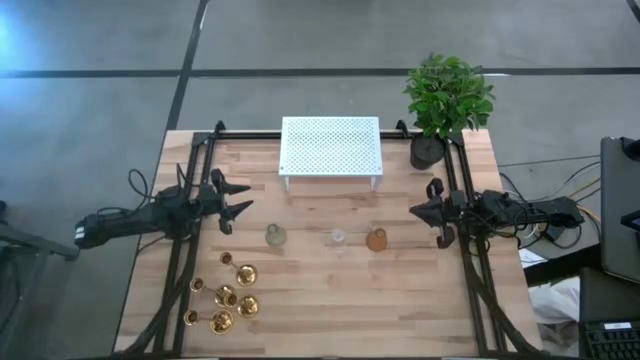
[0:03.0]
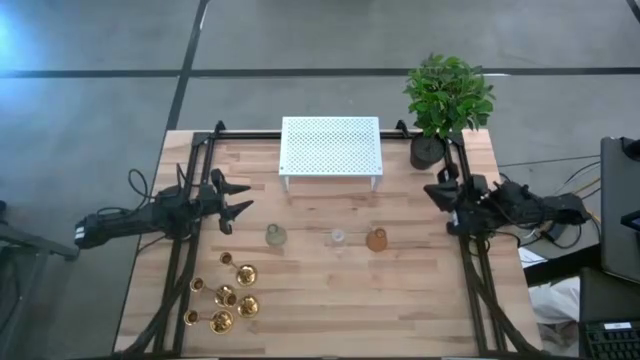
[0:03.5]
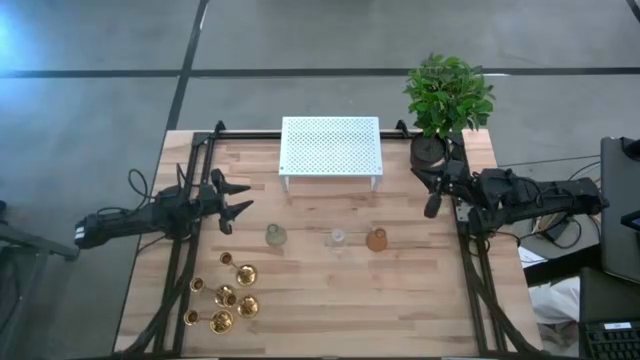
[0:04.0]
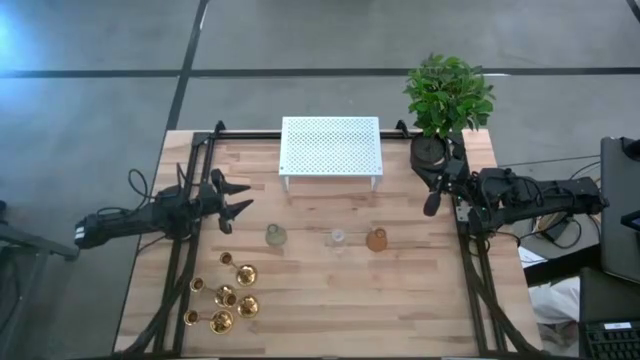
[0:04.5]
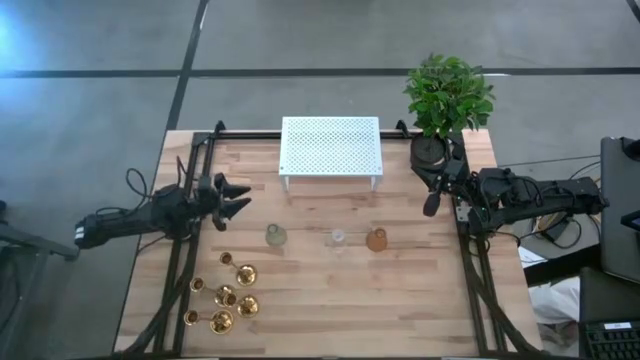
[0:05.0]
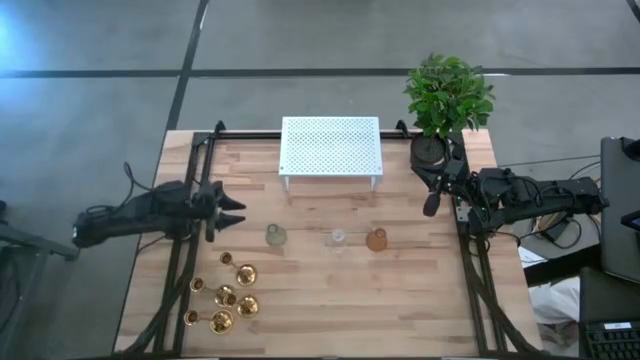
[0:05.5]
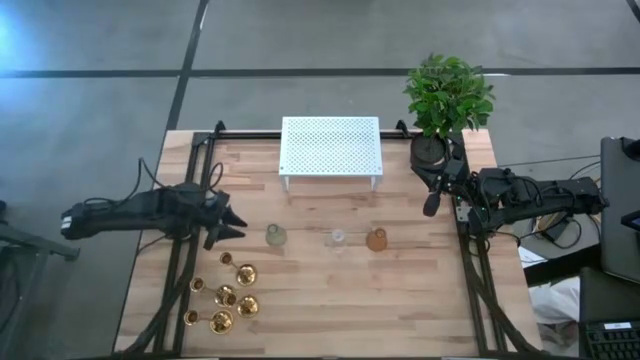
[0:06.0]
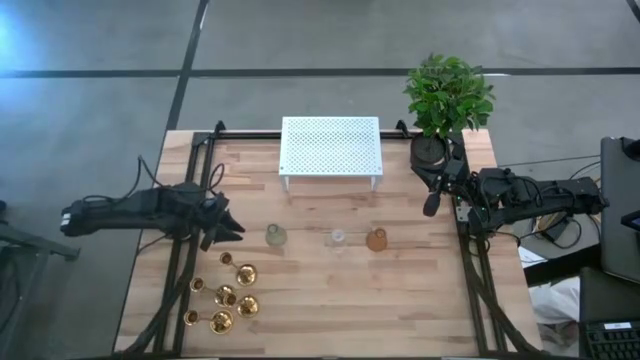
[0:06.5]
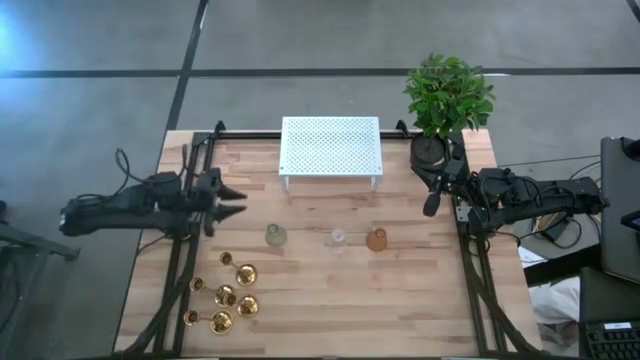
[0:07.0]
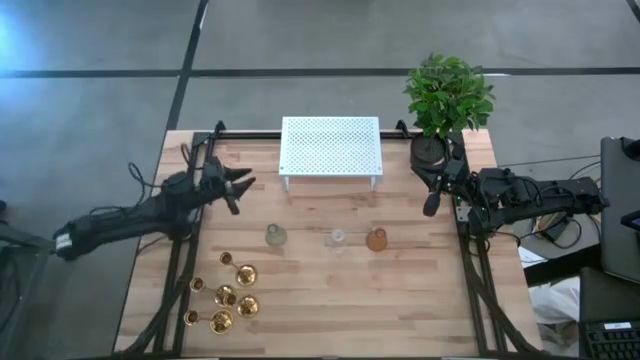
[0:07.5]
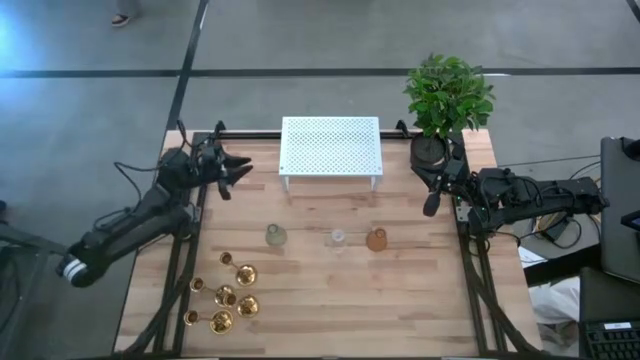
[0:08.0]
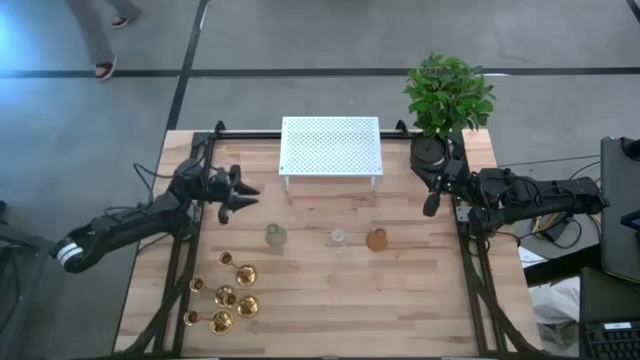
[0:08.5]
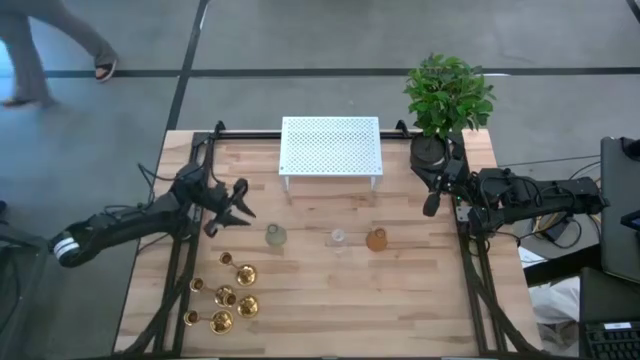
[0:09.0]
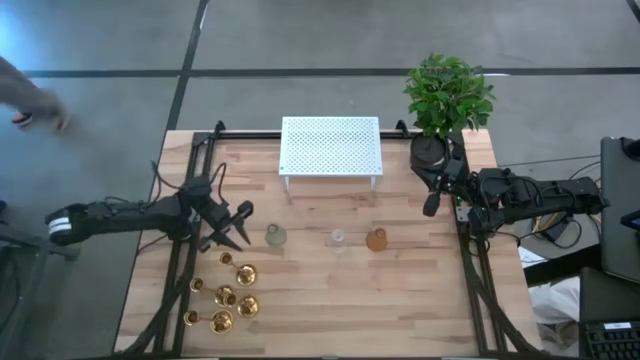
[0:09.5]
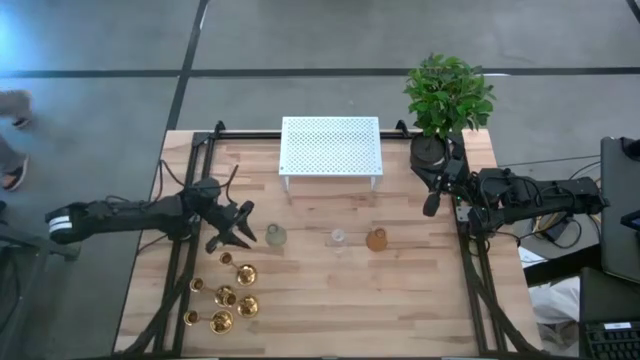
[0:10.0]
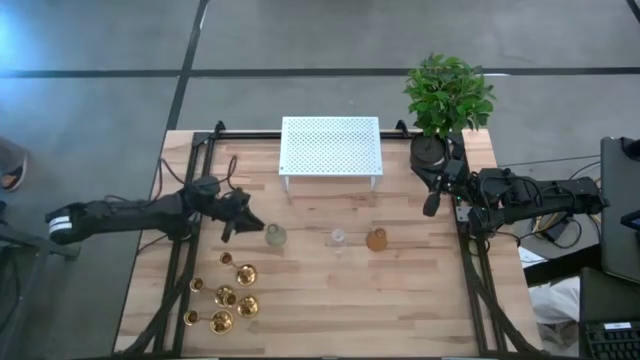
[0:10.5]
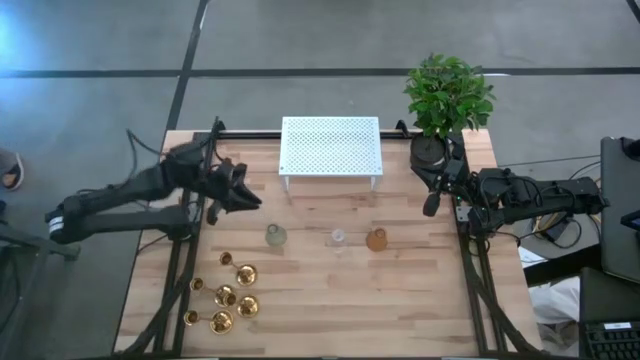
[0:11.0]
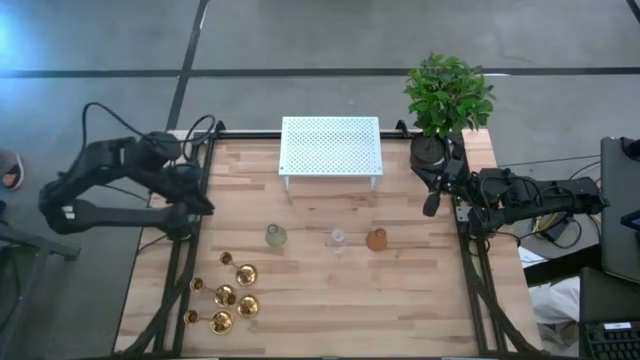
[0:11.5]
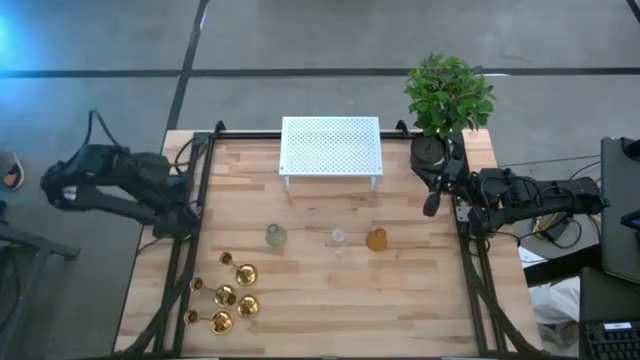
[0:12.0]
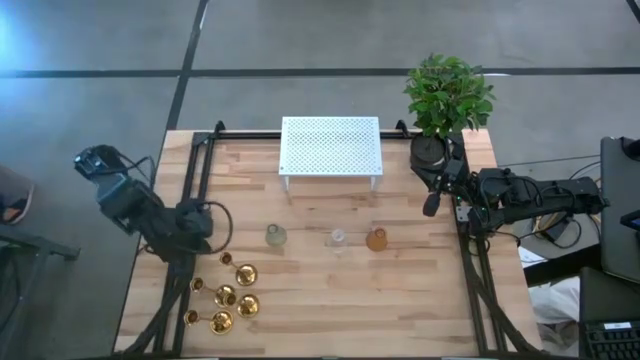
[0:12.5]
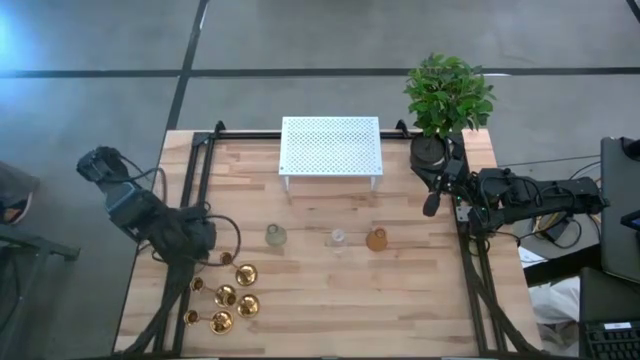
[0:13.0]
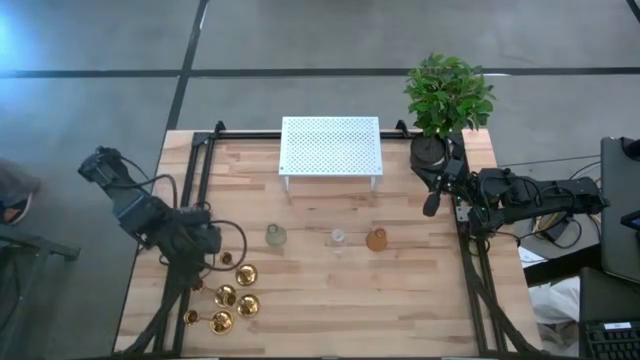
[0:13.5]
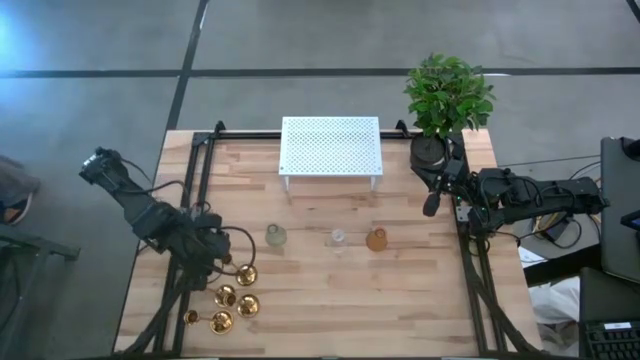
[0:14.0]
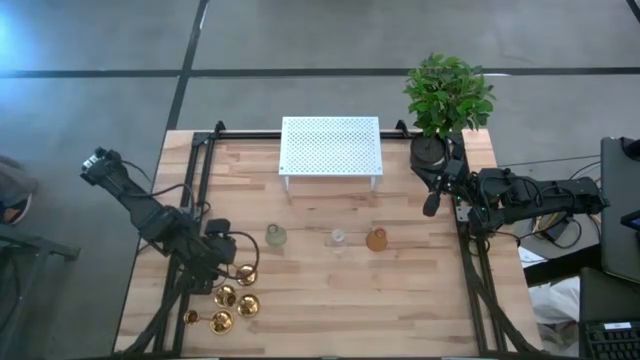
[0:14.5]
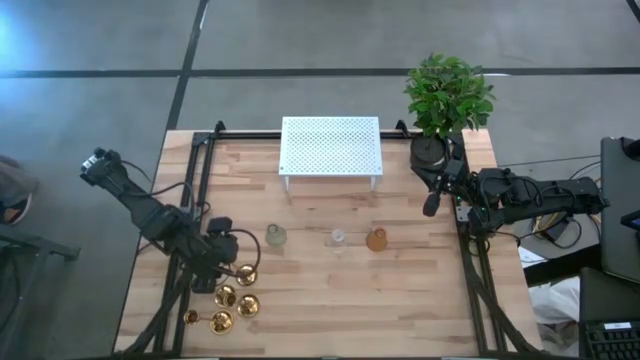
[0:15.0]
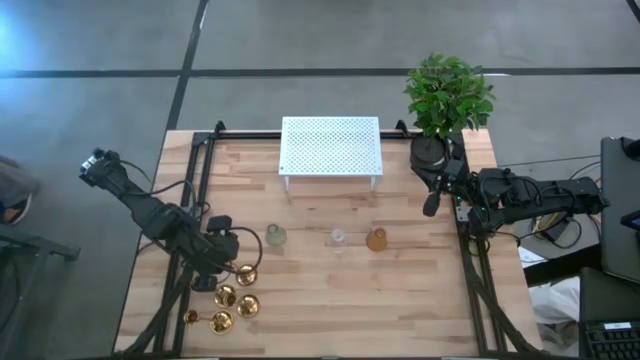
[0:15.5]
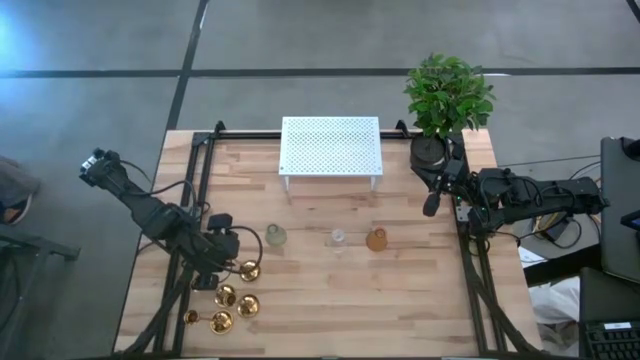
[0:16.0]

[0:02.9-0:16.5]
Task: Pick & Place candle stick holders
Put the gold candle holder on the shelf

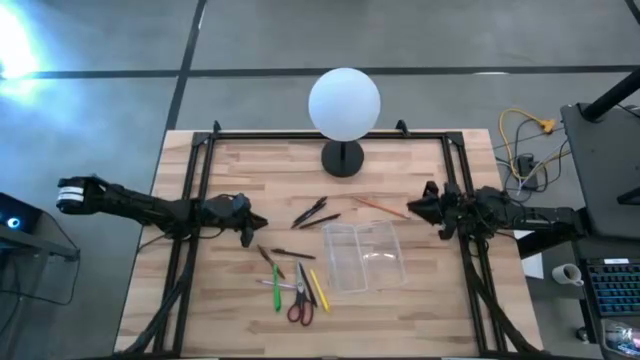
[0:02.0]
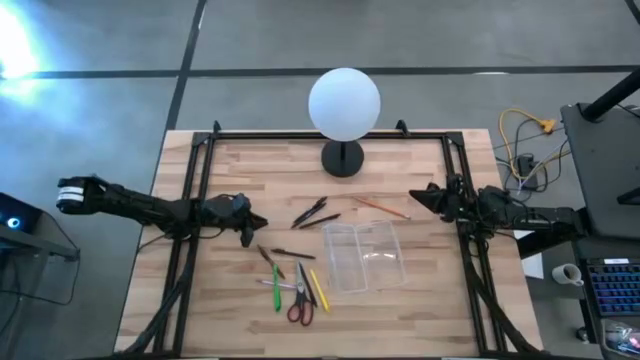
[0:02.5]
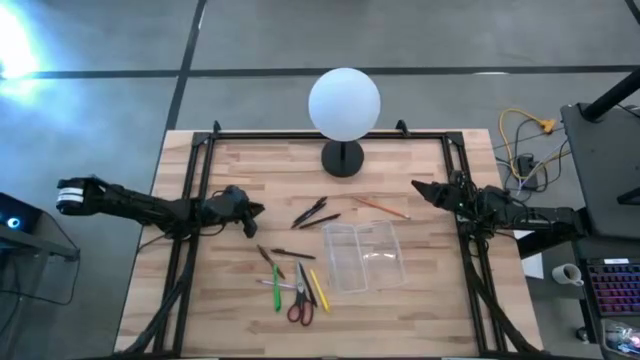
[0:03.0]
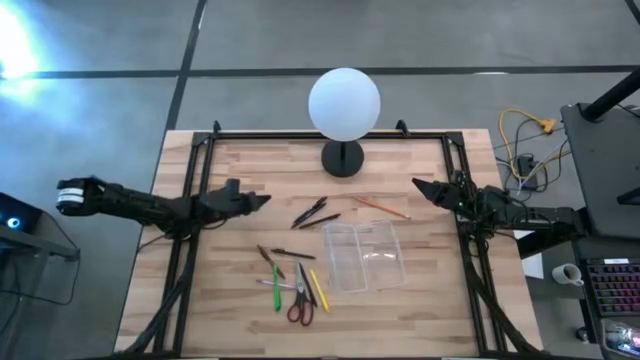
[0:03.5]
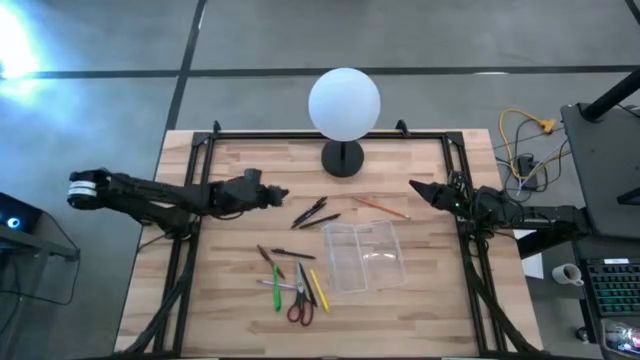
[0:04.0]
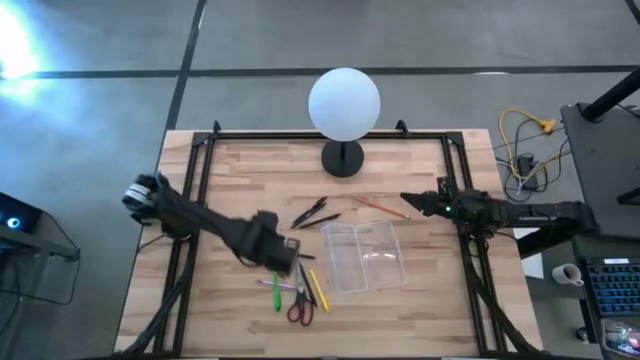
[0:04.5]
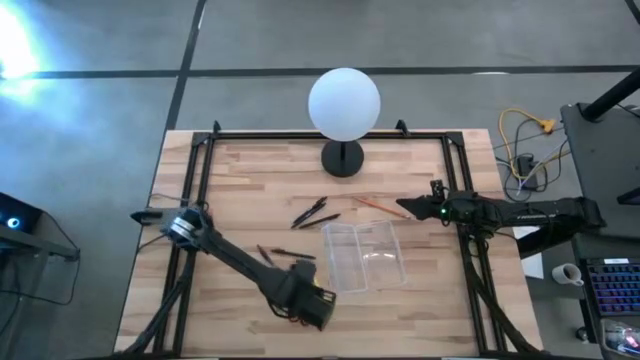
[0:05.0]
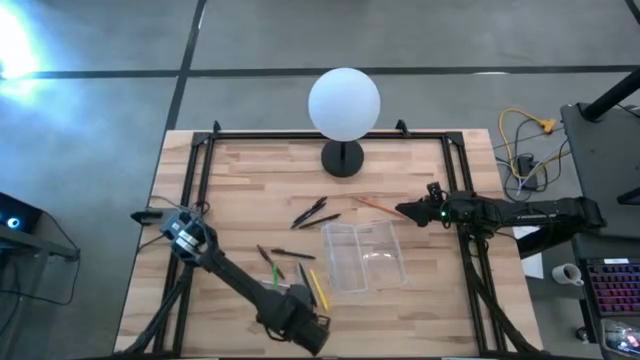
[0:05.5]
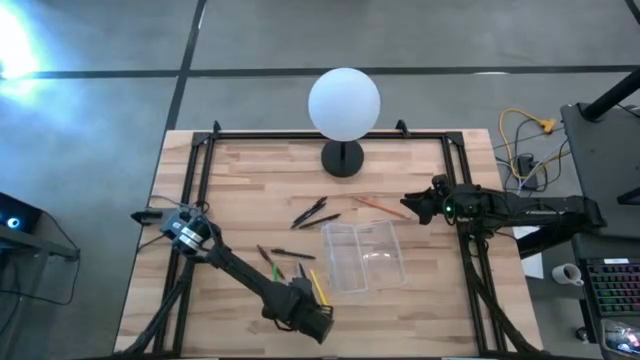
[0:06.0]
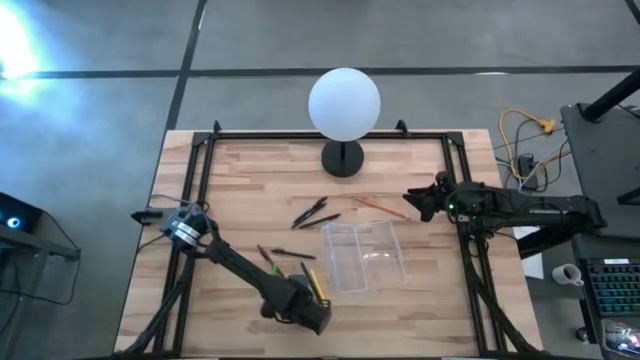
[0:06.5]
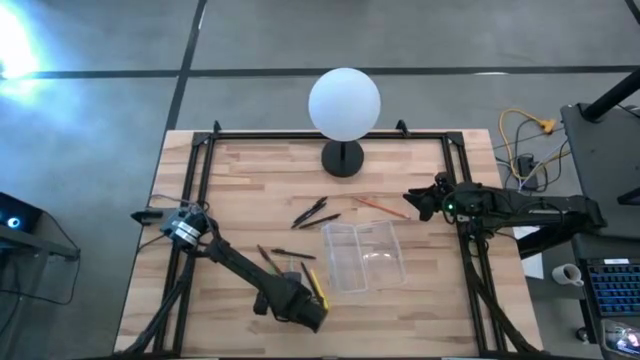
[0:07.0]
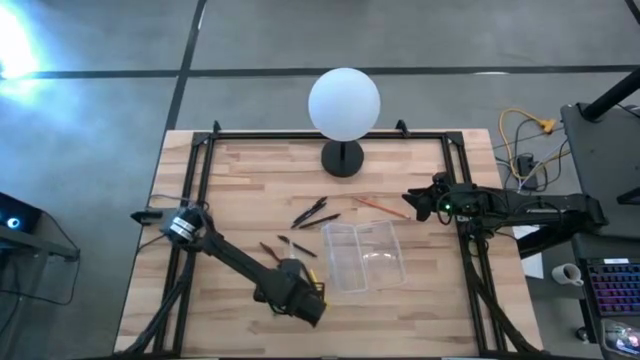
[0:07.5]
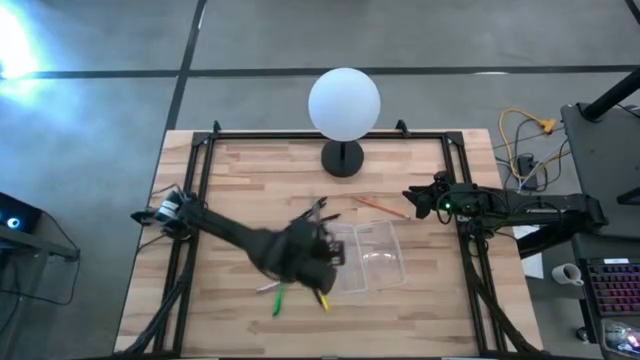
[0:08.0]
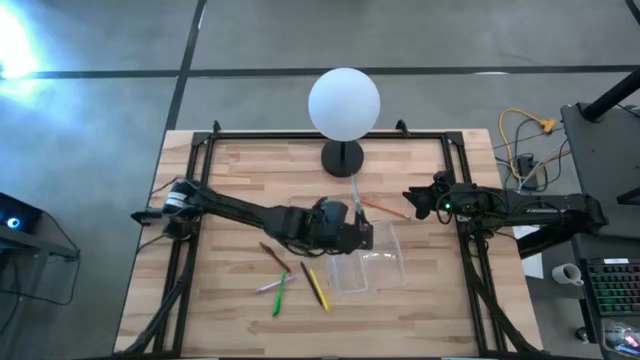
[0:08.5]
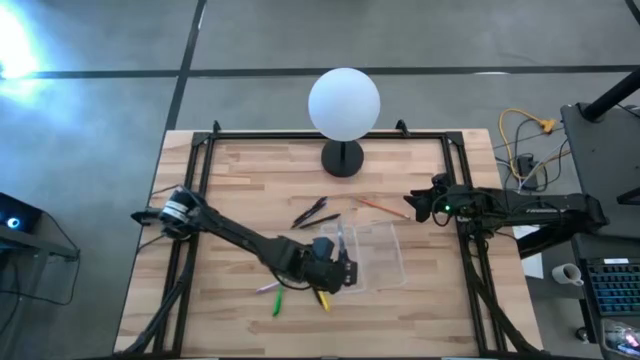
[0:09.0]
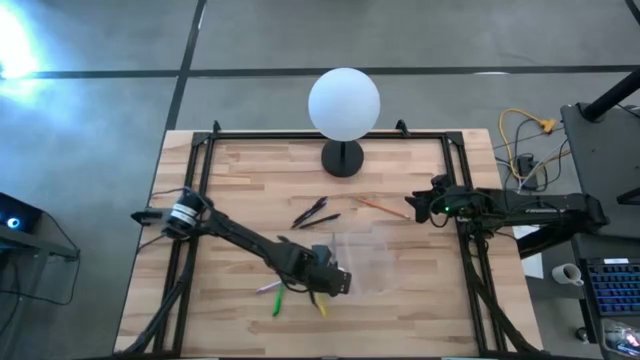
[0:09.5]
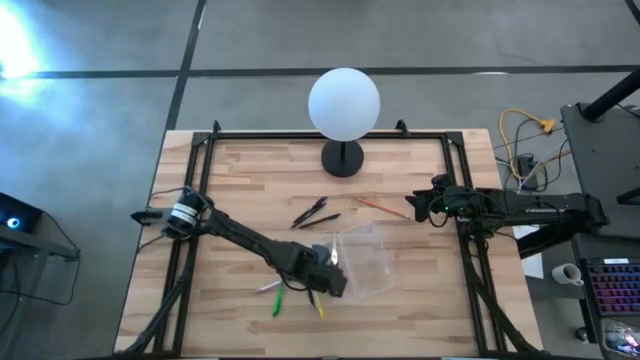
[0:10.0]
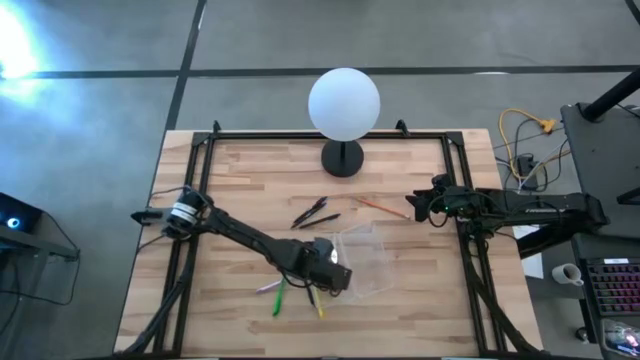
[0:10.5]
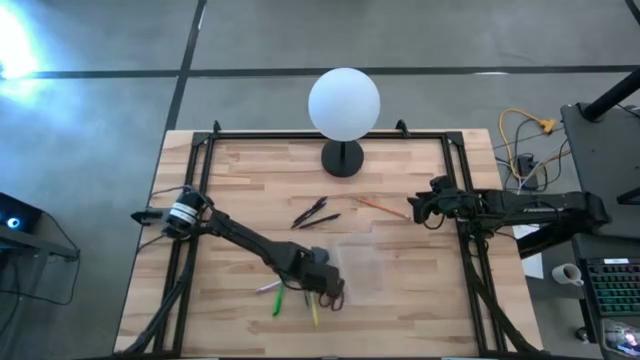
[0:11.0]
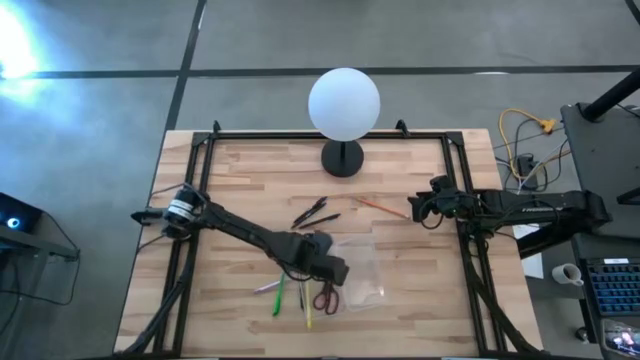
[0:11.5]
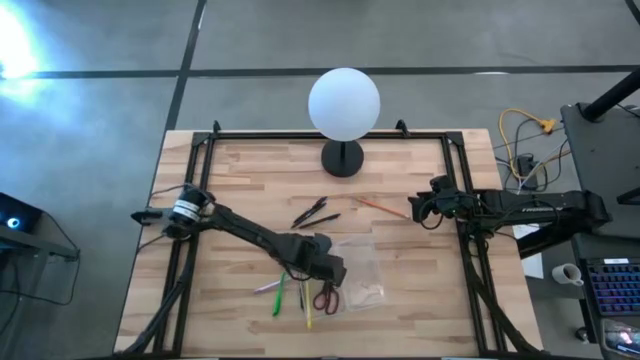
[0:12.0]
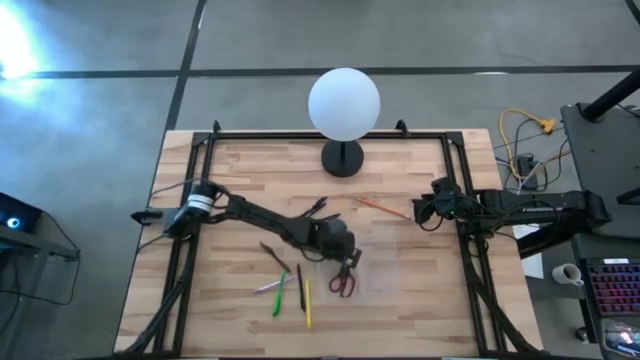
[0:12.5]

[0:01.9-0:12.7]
Task: Pick & place school supplies into a supply box
Put the black scissors into the transparent supply box
